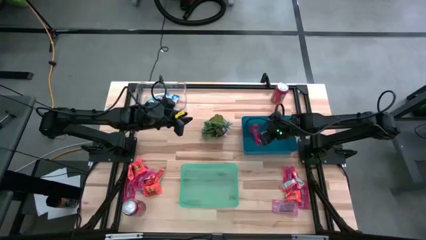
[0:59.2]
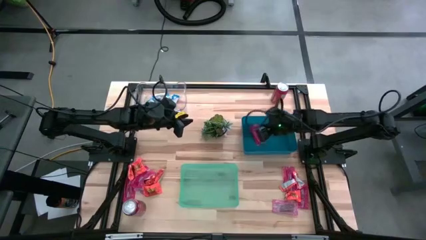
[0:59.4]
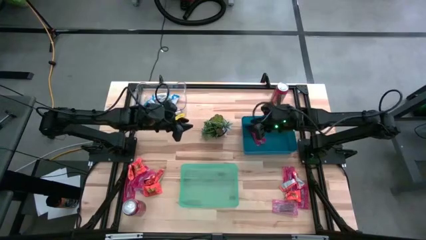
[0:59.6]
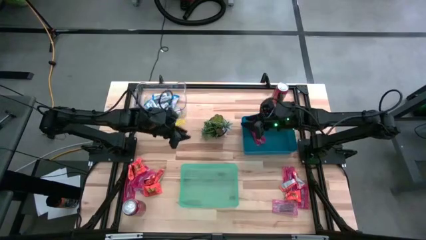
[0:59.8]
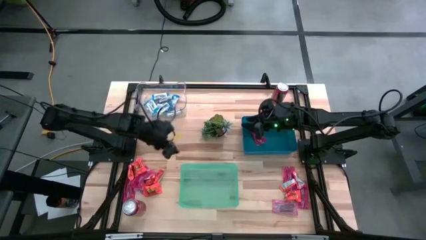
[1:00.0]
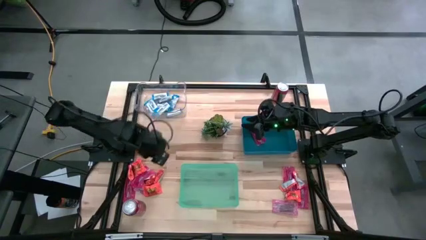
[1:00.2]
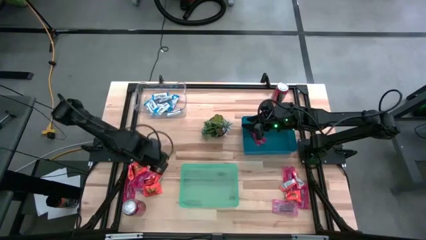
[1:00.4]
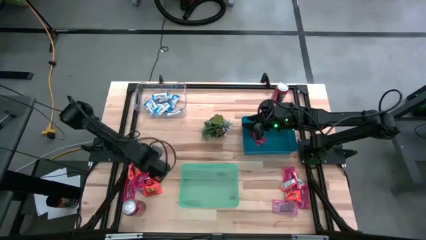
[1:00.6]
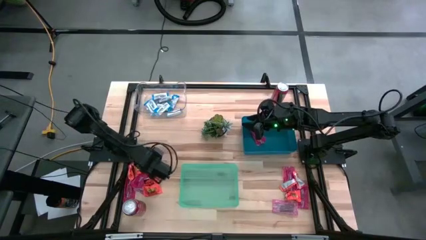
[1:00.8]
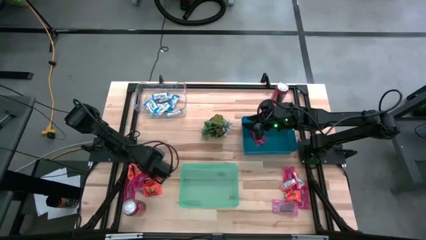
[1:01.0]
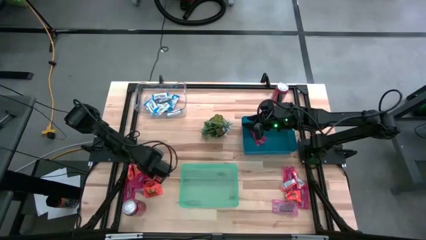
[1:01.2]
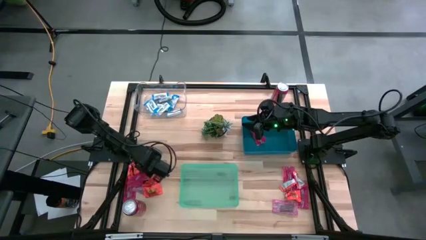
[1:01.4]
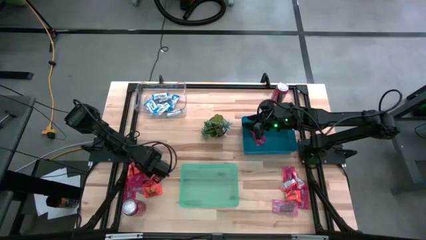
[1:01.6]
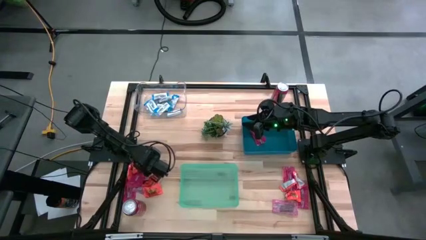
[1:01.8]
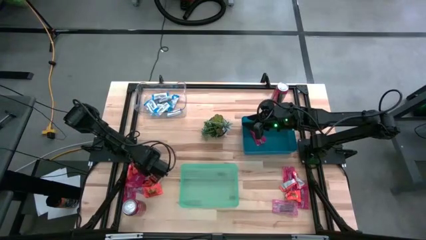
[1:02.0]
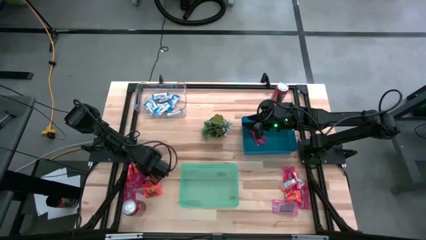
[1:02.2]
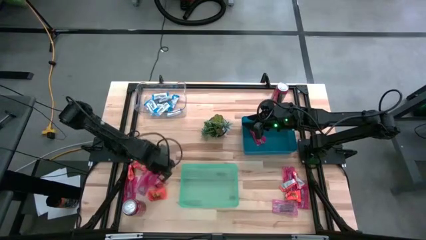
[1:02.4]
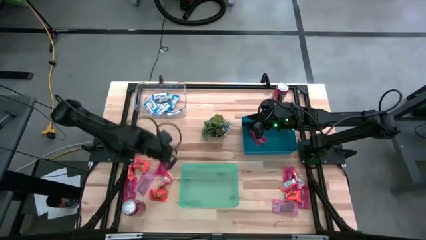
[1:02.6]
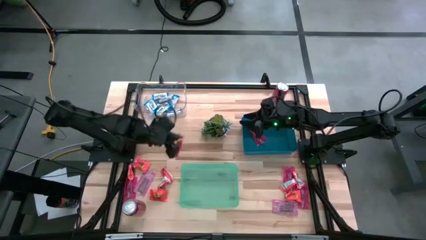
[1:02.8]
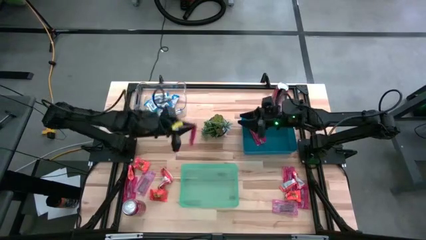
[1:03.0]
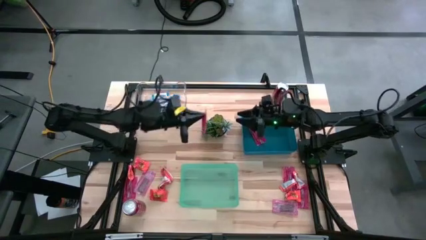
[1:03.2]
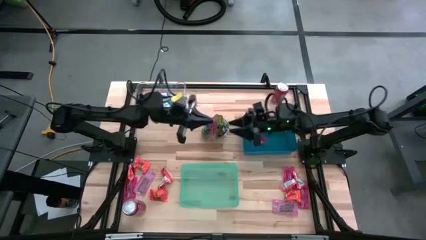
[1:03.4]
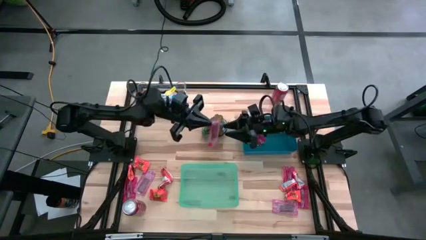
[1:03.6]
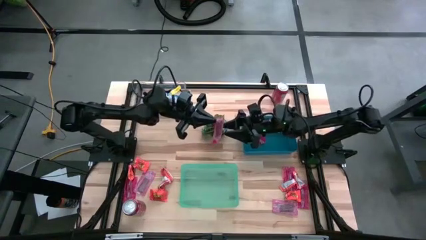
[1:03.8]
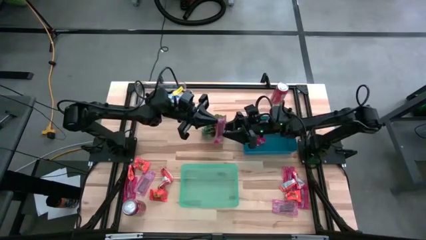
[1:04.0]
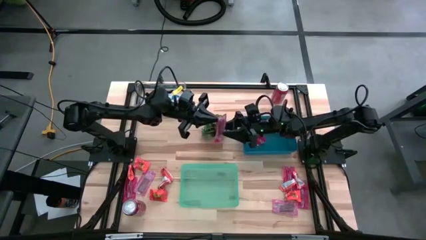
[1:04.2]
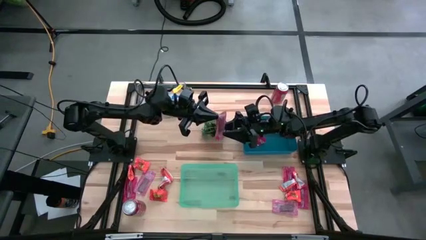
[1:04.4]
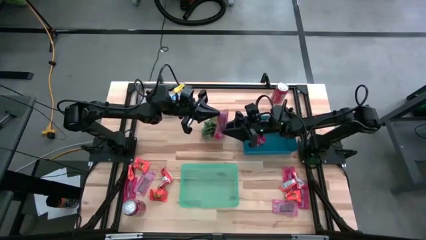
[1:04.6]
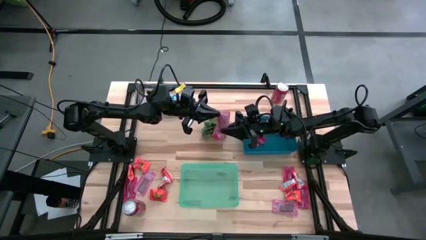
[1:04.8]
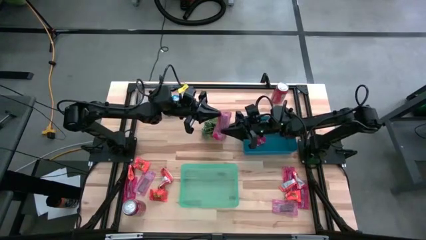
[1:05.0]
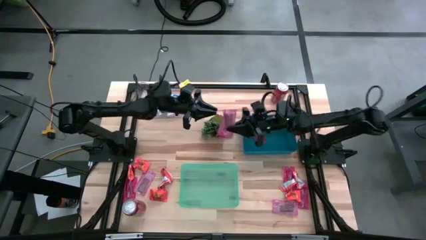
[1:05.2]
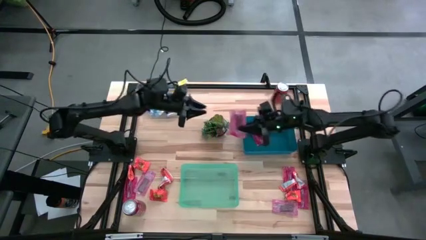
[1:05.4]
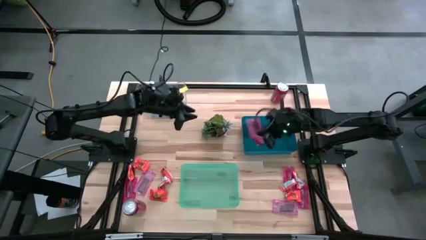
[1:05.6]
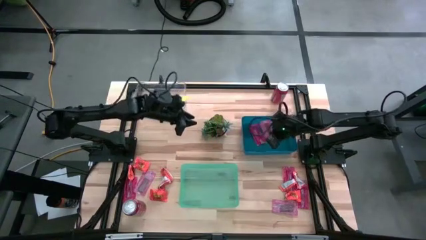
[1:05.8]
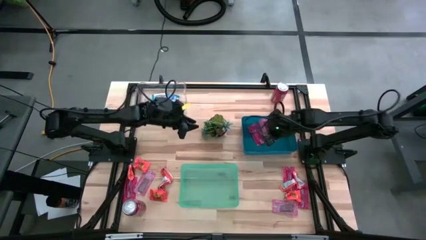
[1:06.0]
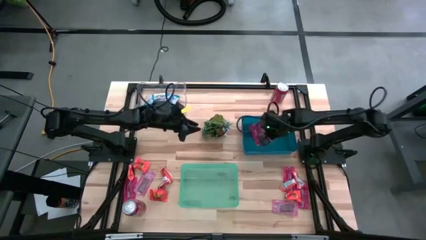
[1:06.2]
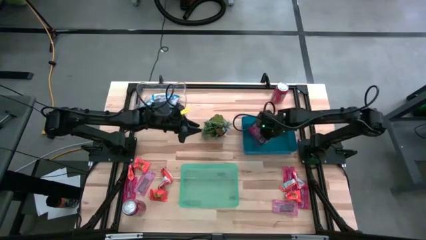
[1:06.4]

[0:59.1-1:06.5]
Task: Sort candy
Put the red candy into the blue bin

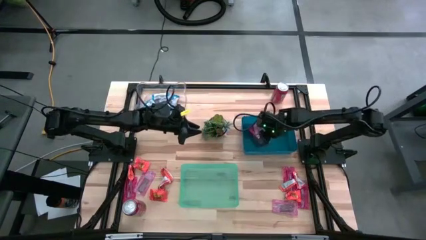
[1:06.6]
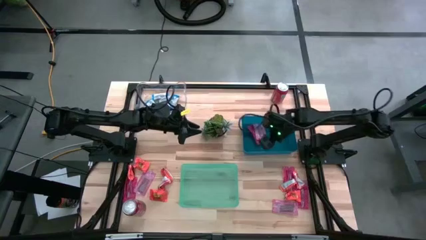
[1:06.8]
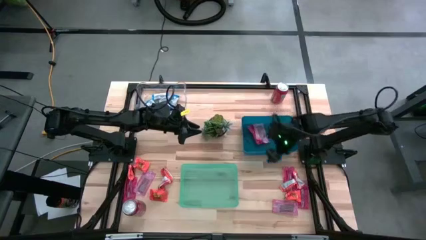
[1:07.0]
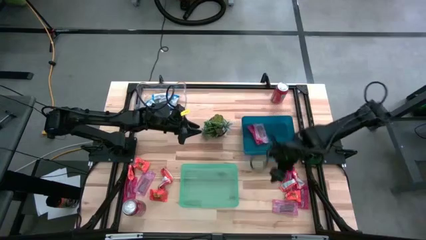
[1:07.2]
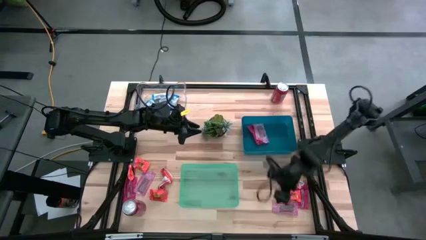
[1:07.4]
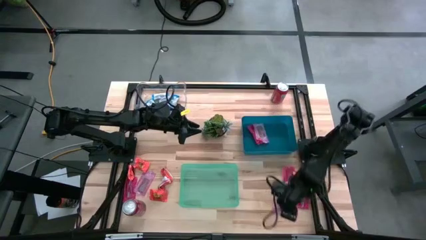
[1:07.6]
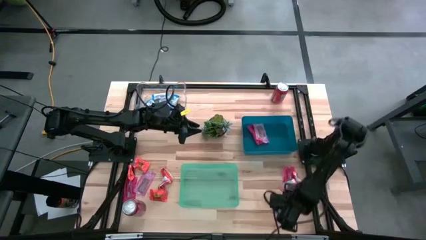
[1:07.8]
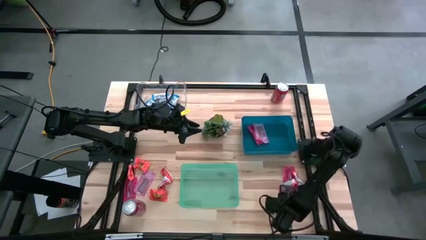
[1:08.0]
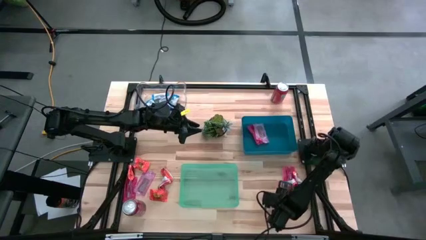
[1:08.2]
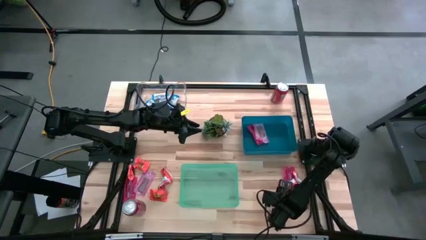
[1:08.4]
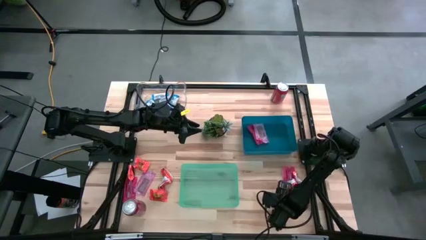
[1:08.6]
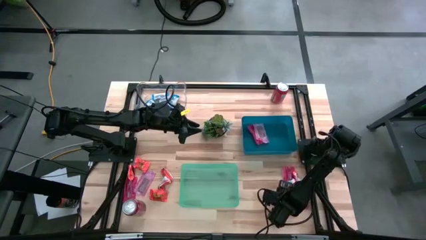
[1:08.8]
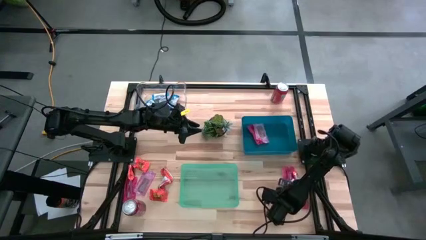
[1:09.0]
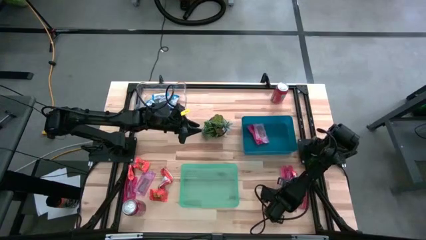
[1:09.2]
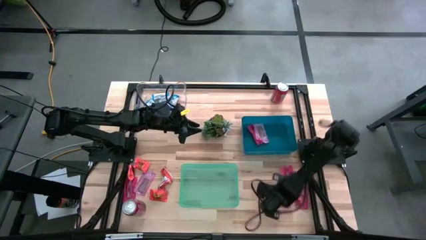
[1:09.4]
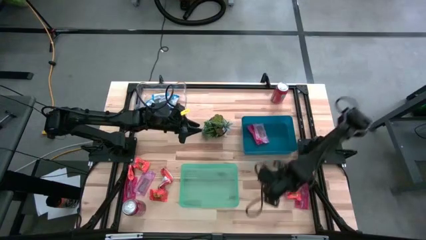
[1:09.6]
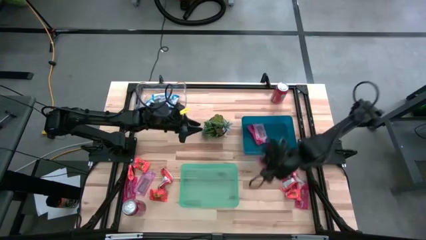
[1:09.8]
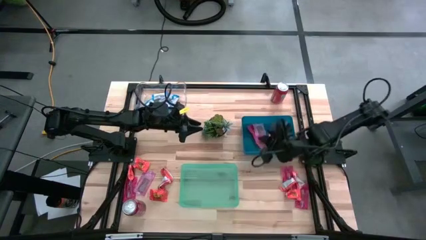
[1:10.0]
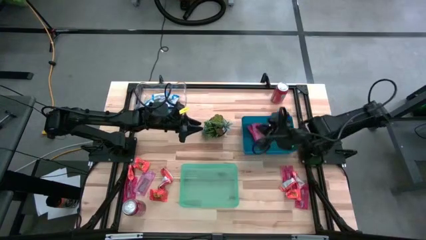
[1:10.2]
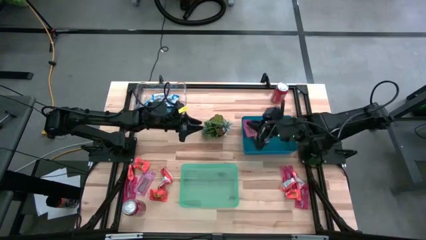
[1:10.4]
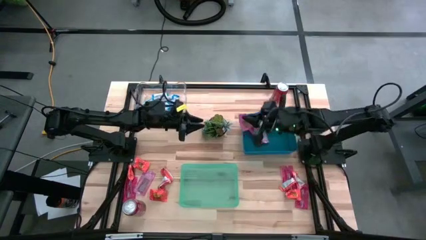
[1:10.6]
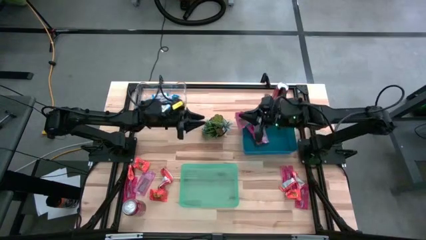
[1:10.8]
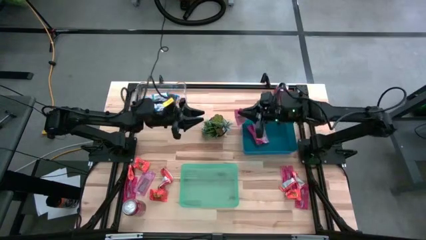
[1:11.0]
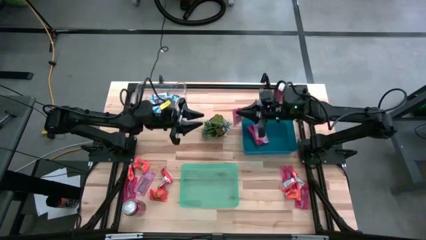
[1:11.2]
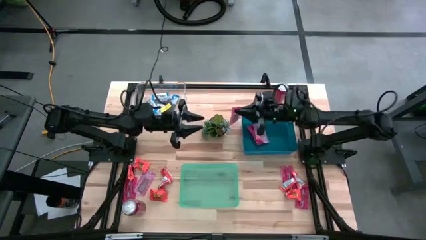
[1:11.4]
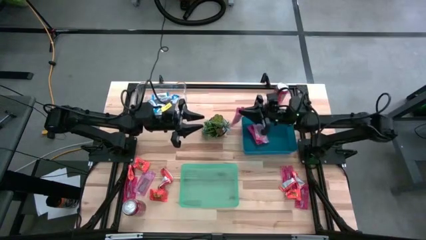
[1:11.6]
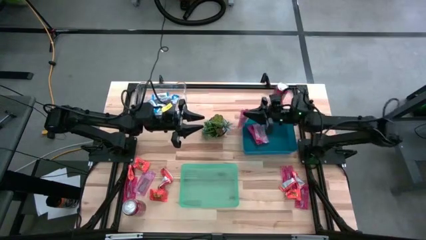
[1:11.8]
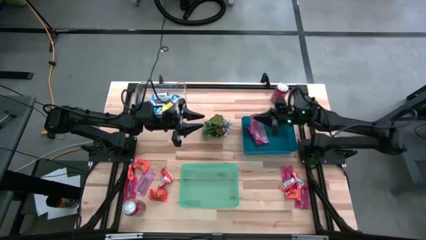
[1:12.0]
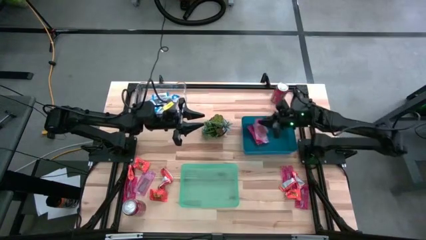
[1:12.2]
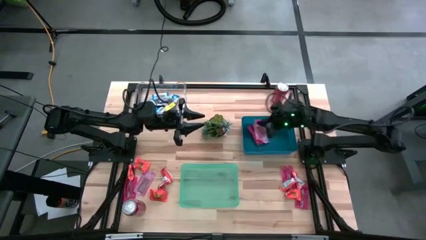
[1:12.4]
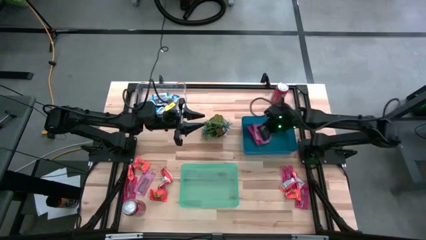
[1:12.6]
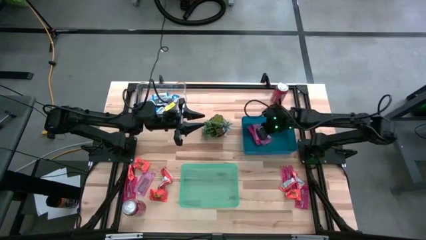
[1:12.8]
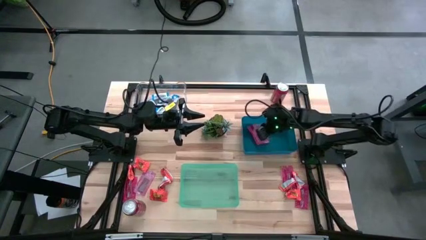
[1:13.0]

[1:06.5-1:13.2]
Put the red candy into the blue bin

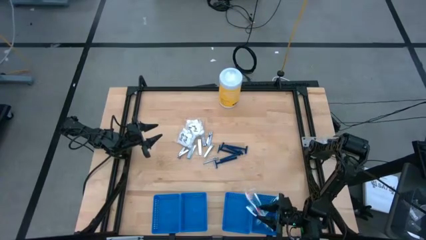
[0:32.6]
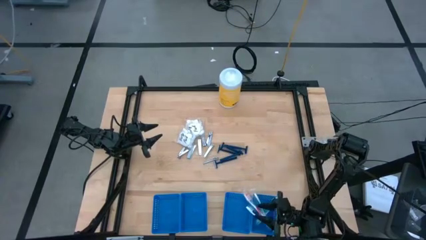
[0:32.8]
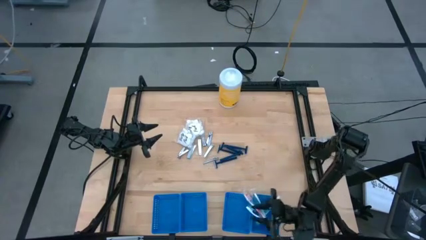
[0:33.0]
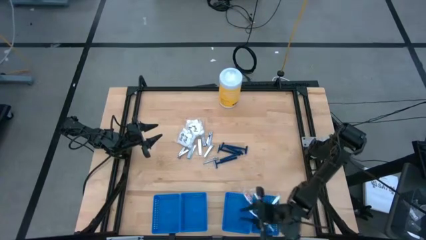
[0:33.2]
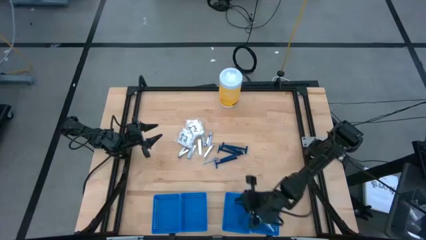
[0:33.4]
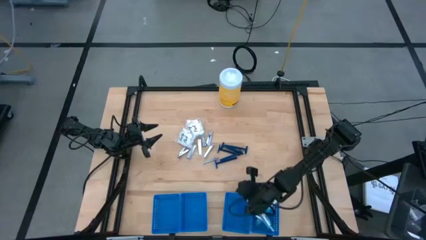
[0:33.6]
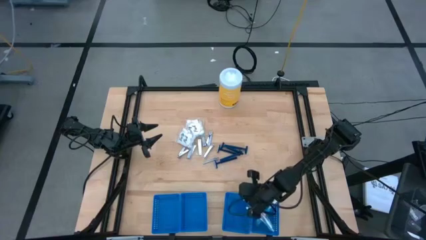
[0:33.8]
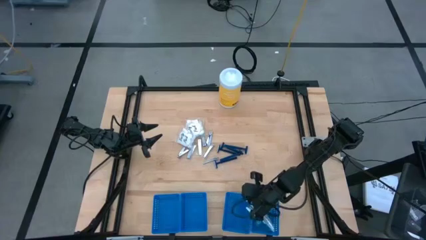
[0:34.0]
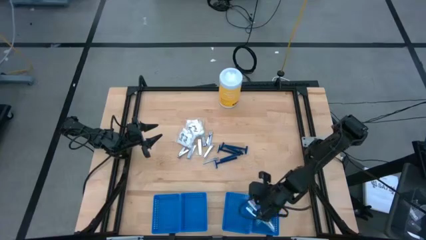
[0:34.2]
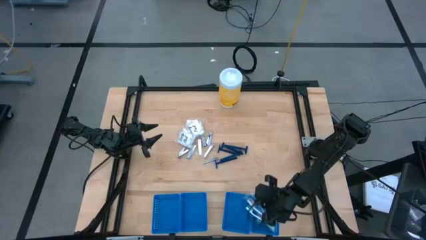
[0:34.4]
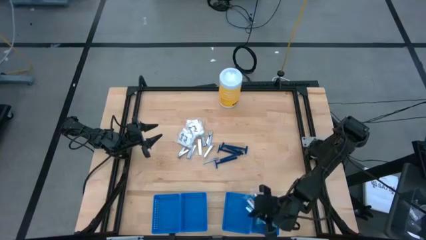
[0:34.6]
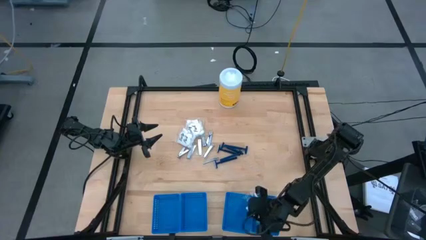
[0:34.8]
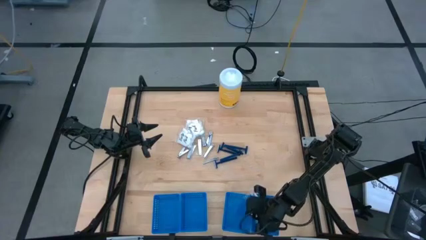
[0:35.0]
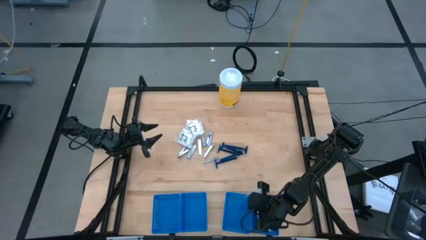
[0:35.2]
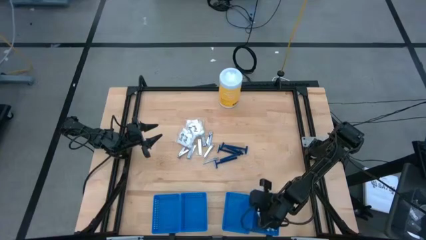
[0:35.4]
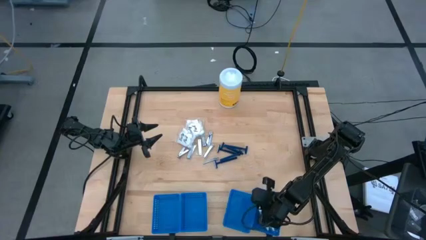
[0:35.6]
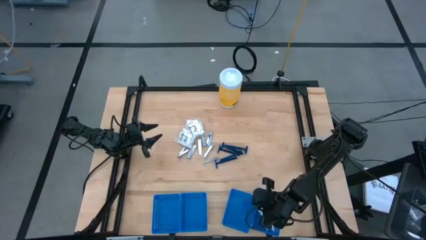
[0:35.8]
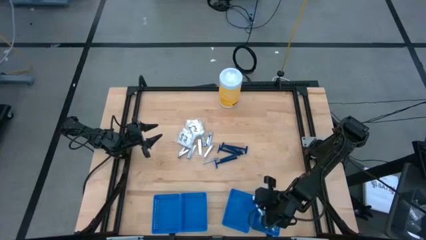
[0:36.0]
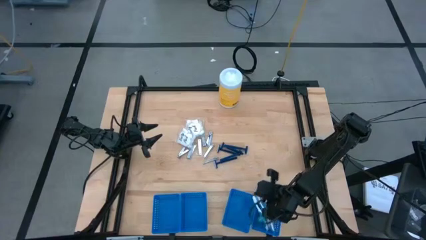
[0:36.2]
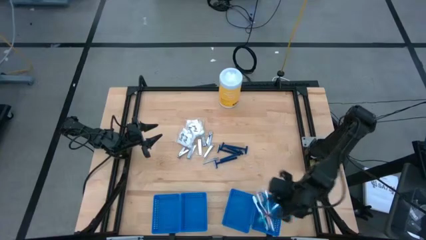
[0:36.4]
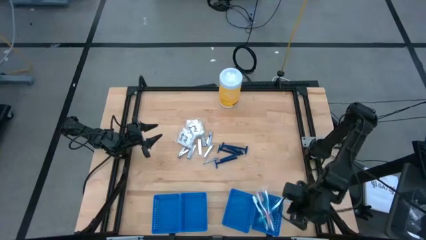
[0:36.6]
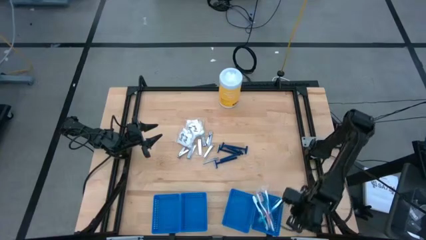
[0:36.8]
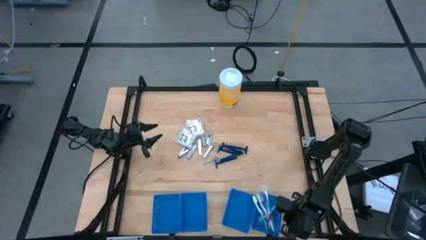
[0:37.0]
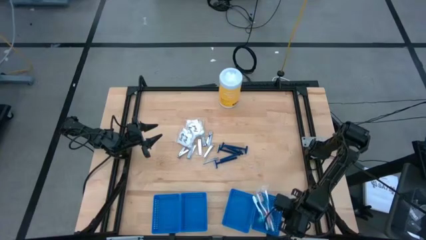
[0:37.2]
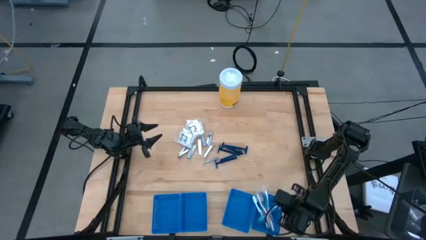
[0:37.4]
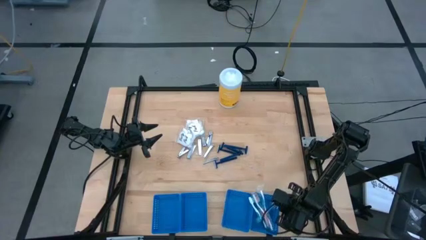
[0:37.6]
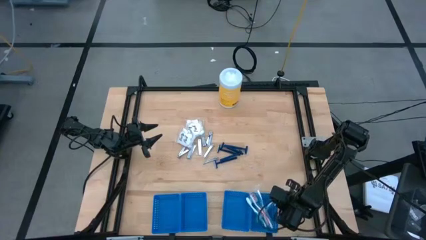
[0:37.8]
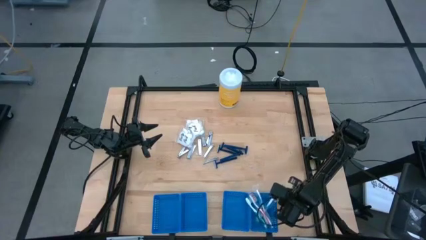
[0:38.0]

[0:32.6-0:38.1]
Task: Pick & Place Travel size toiletries
Adjust the blue baskets
